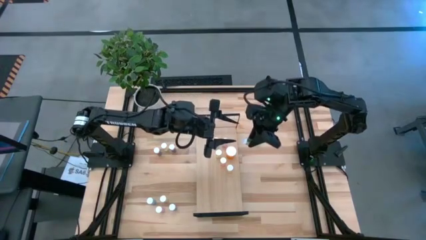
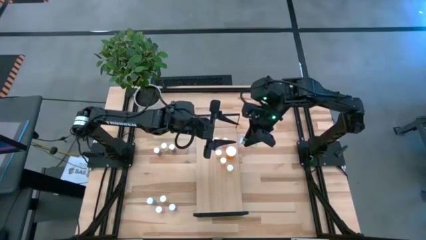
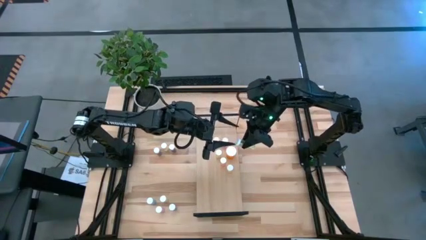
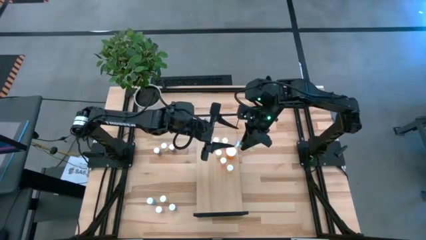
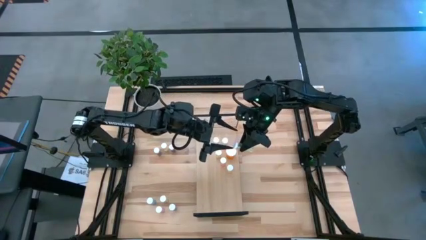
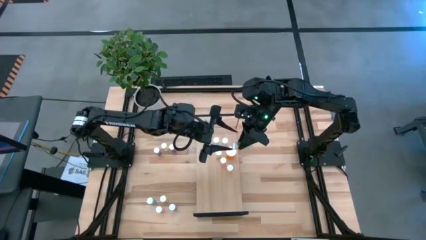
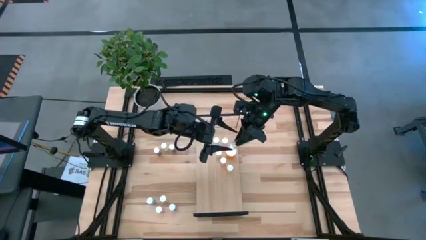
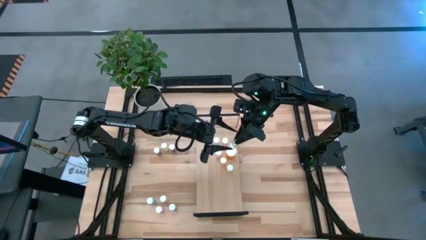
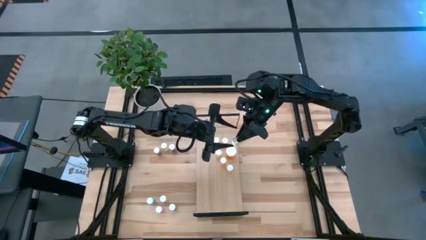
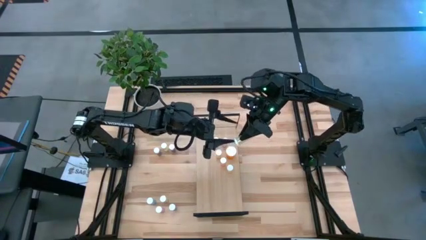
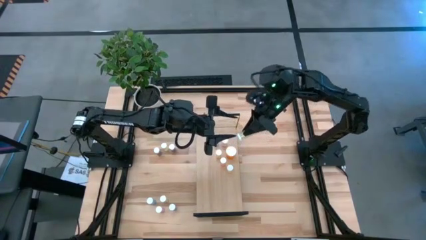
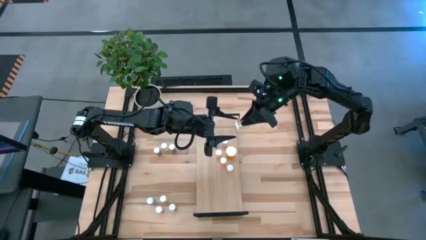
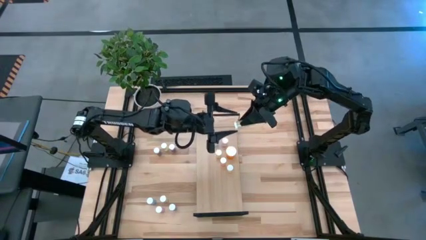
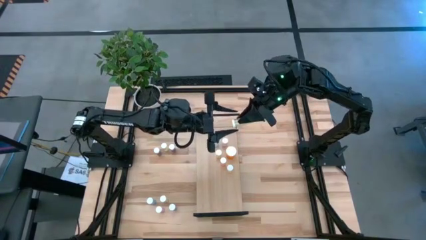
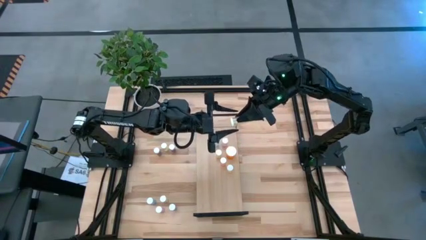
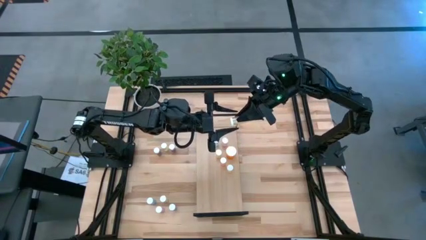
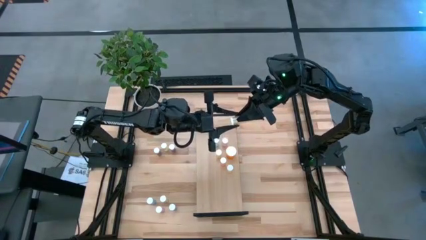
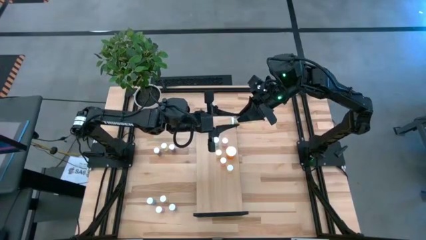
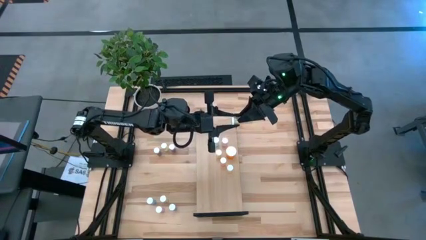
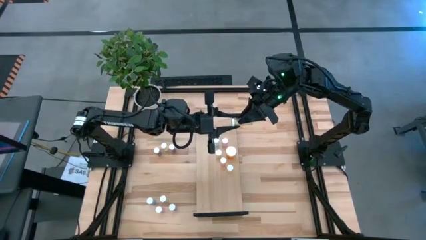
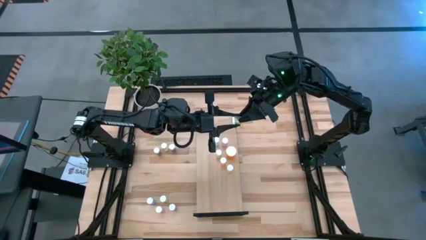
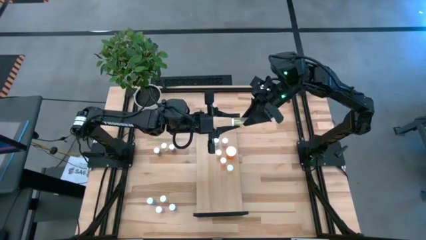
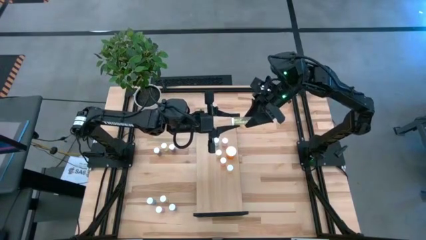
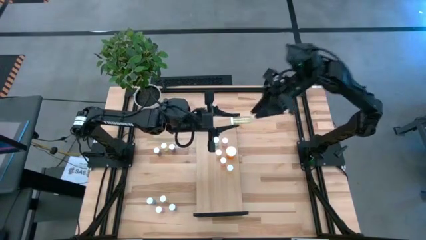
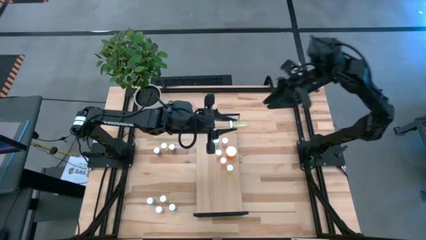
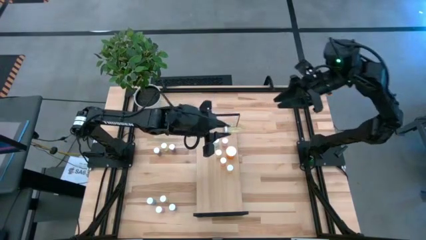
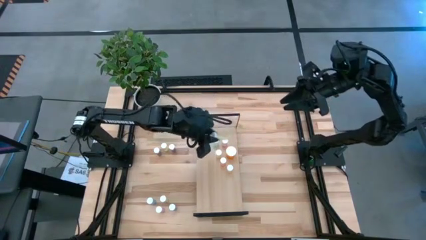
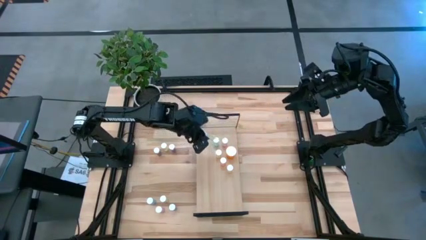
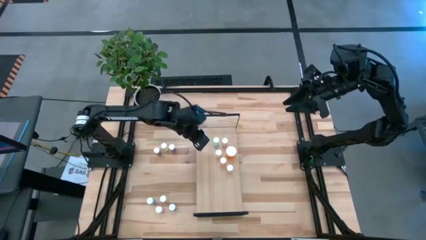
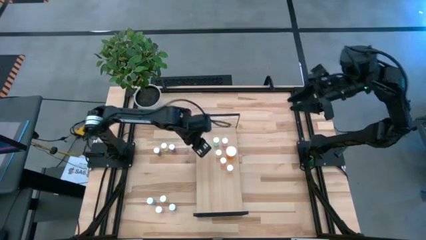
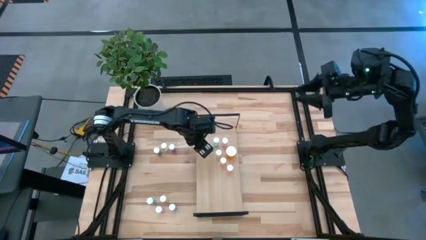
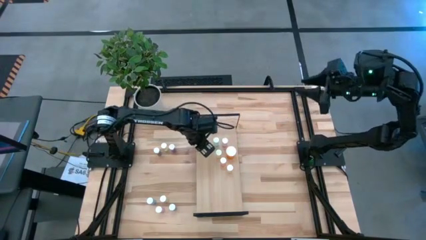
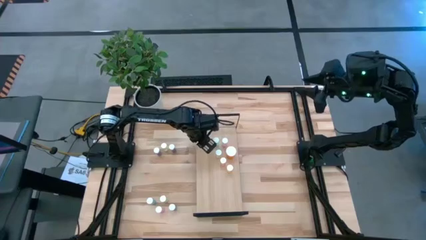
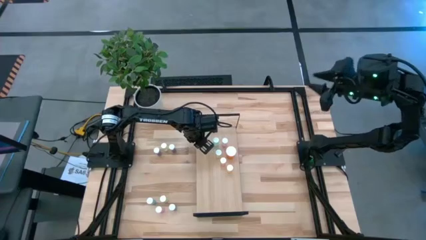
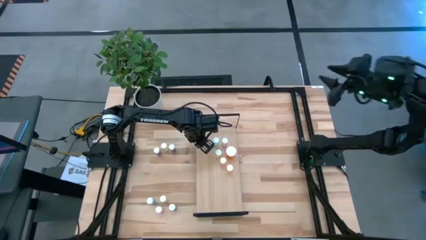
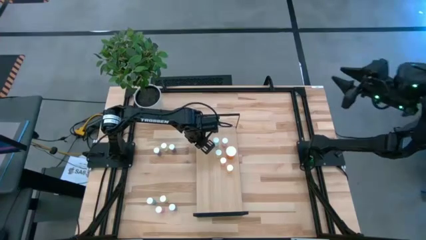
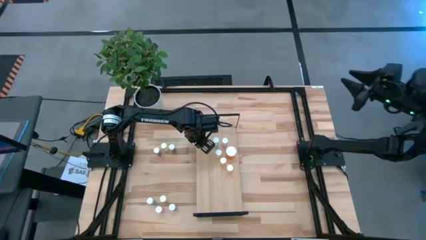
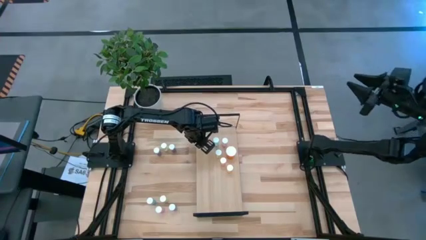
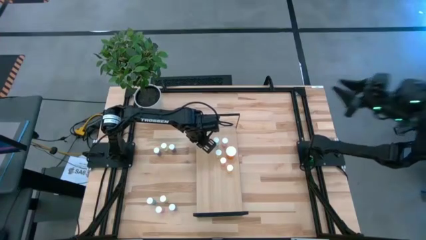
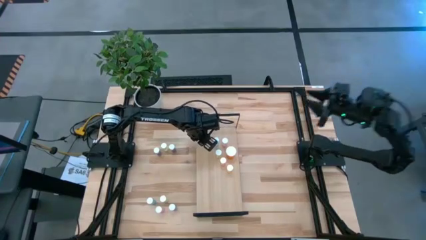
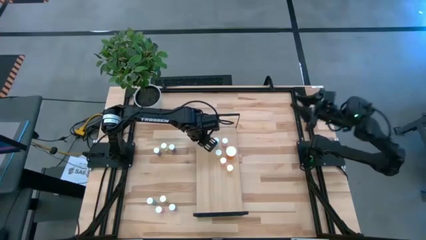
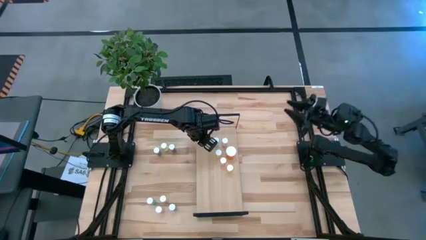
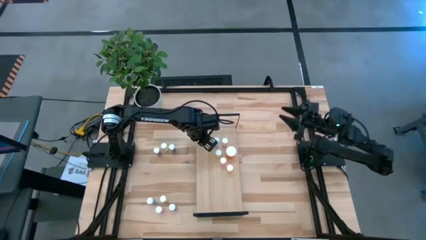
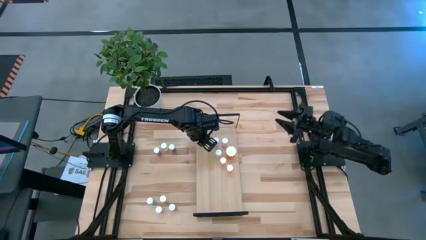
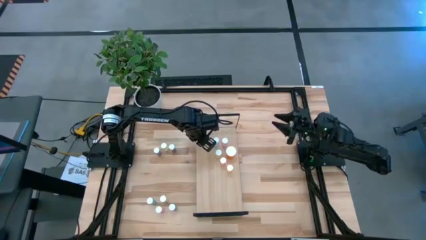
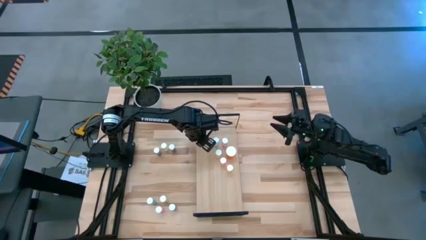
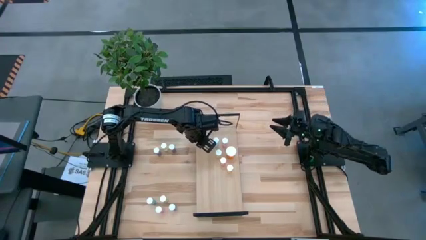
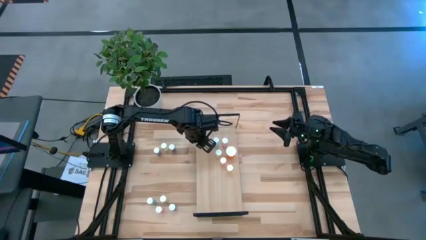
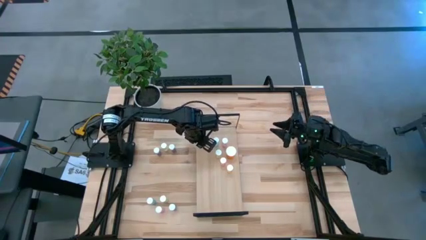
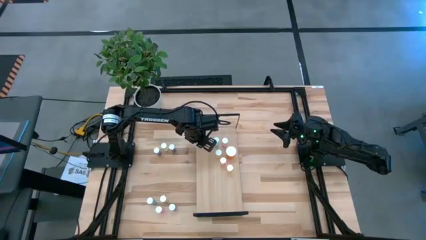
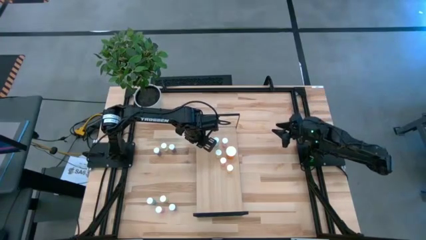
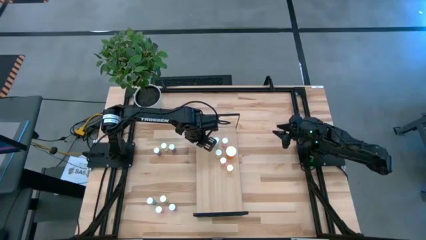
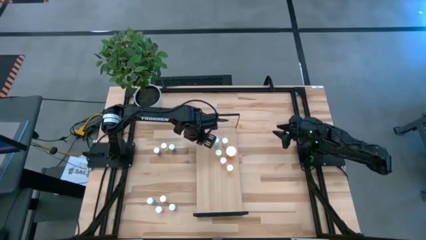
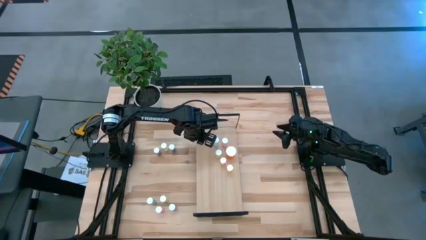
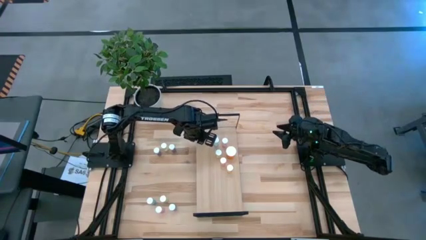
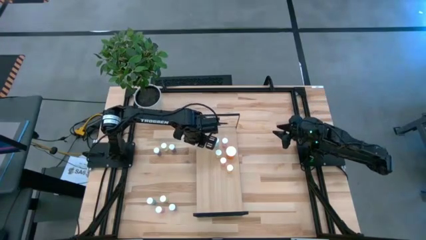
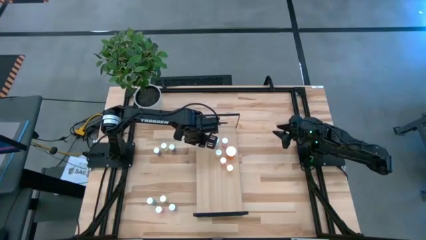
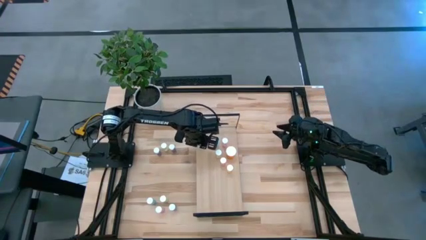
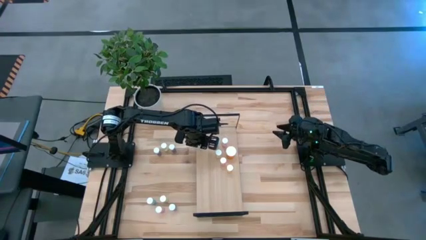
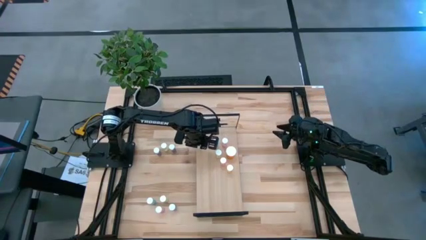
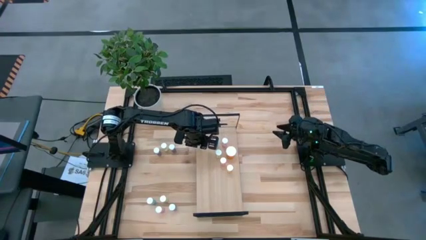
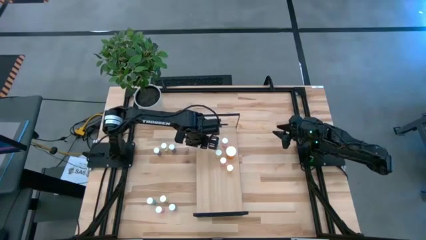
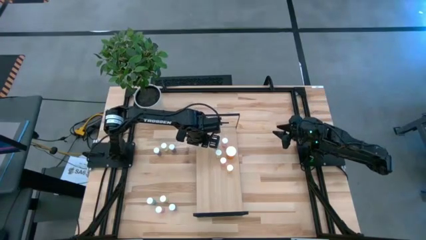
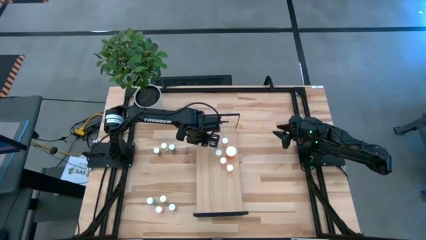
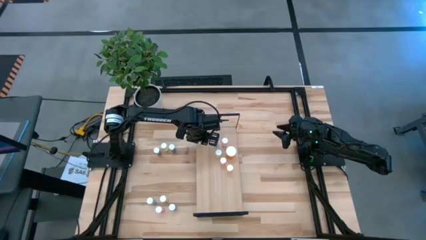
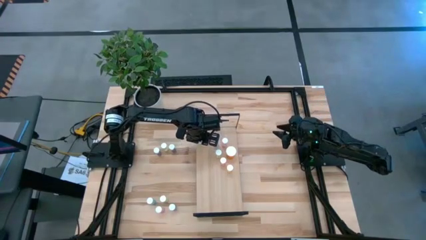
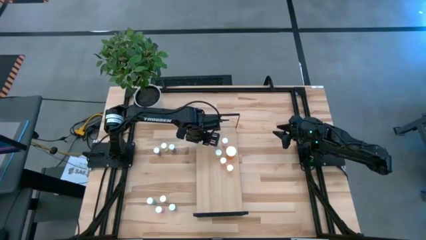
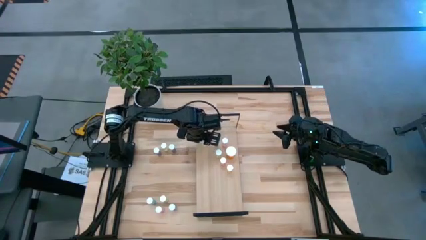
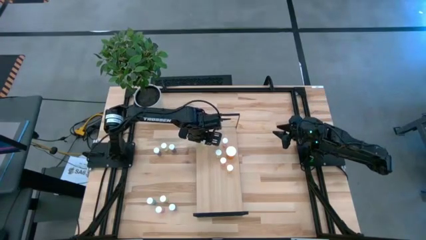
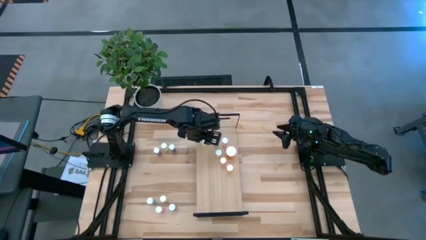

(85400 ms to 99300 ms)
Task: Pick and place medicine bottles onto shelf by color
Put the yellow pill bottle on the shelf

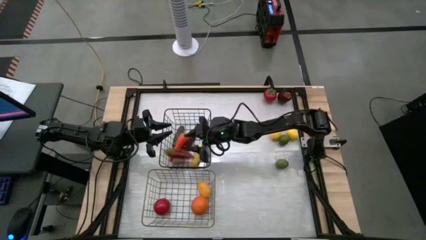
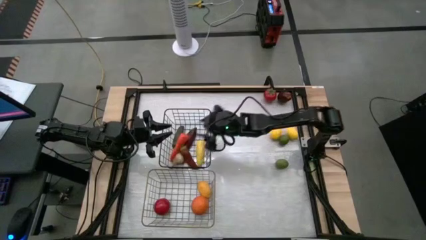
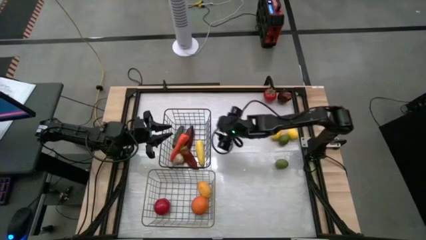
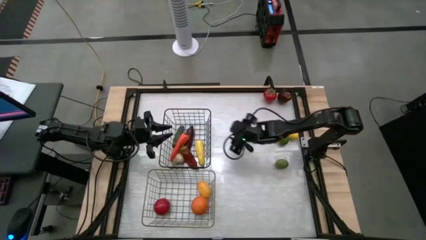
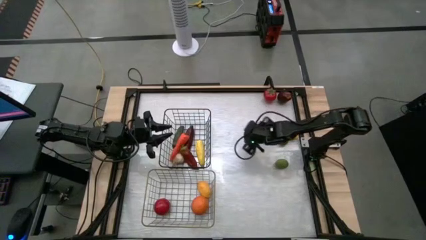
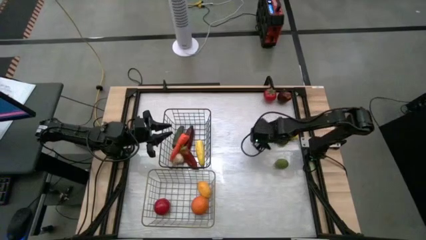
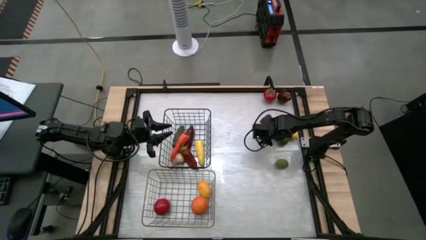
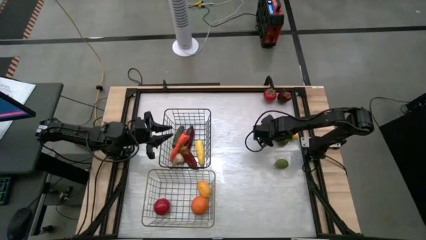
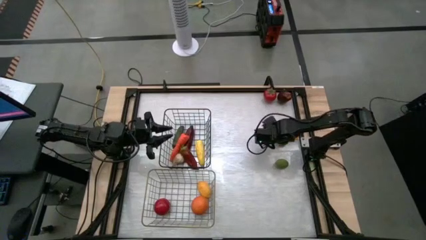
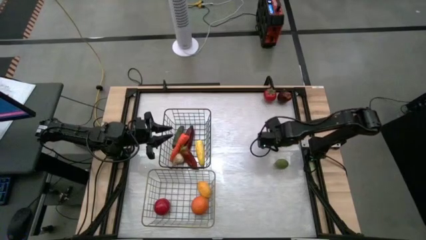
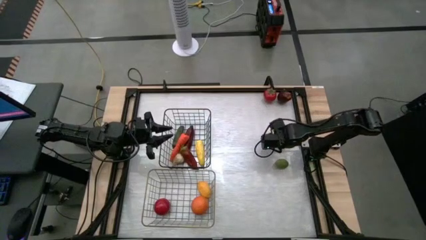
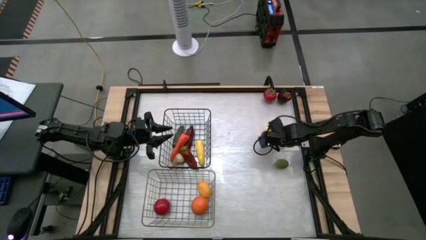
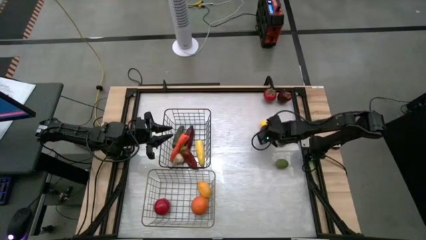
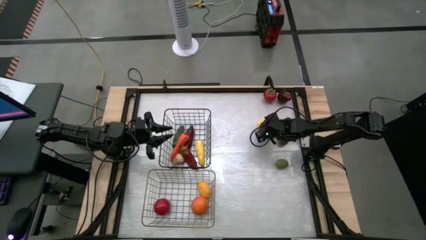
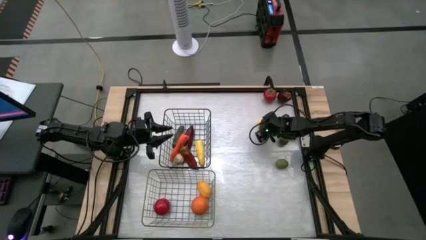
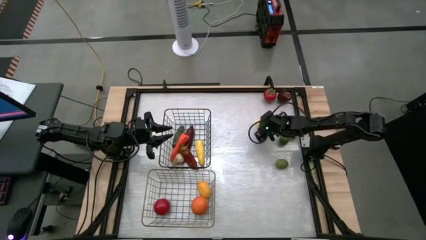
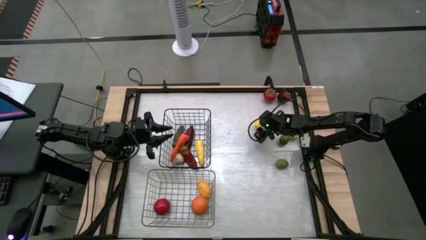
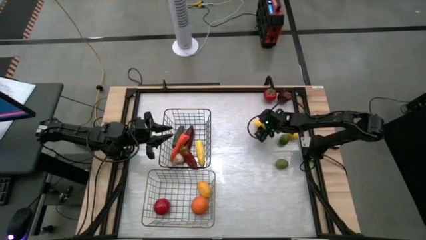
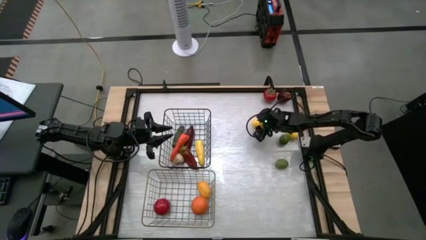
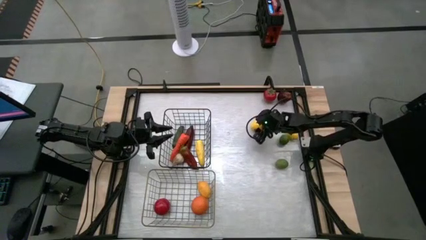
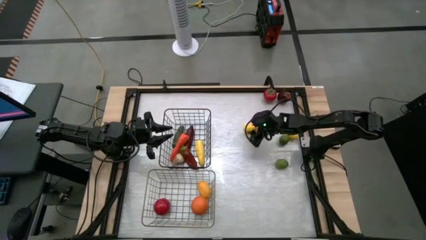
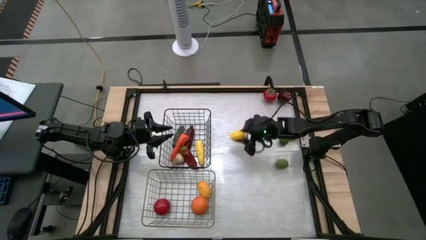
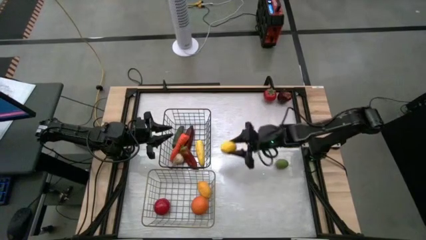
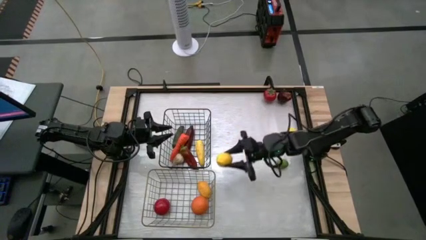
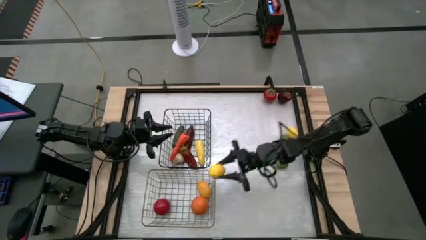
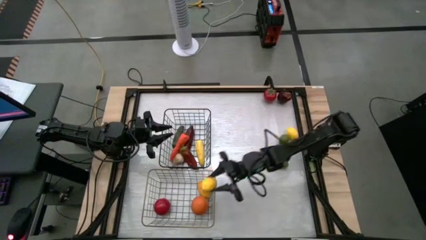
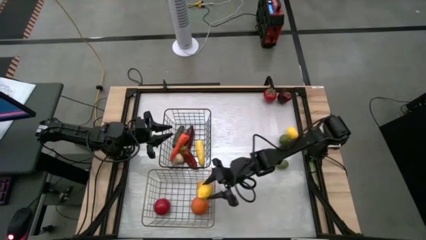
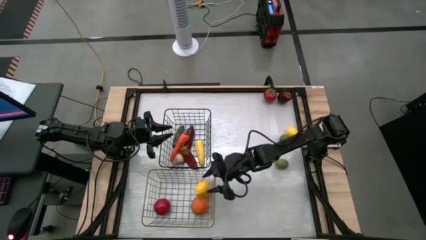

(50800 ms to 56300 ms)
Task: Sort produce into baskets
Put the left lemon into the silver wire basket
